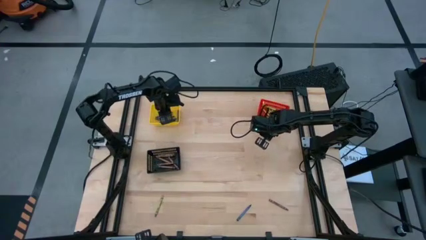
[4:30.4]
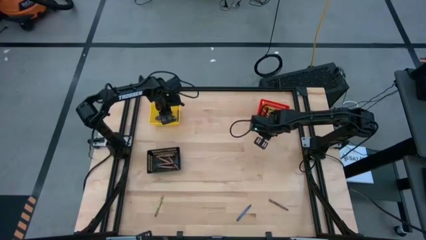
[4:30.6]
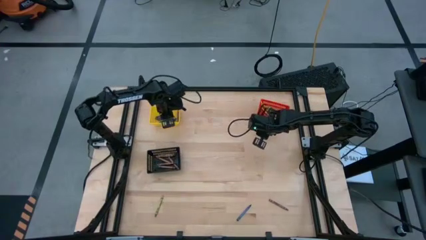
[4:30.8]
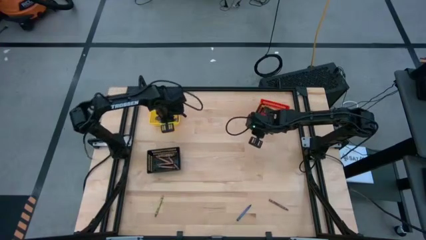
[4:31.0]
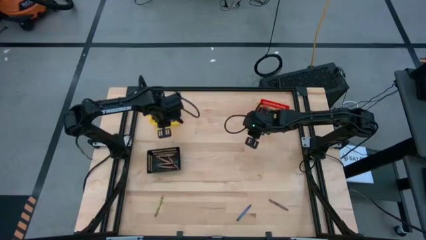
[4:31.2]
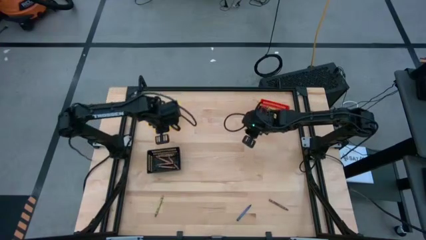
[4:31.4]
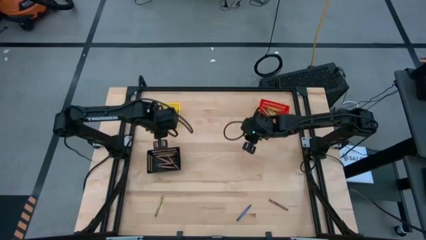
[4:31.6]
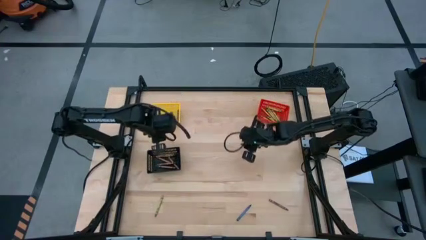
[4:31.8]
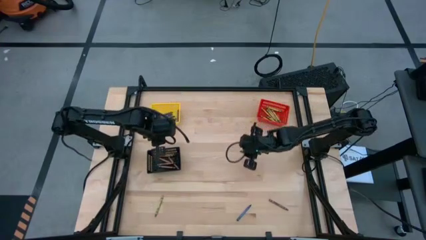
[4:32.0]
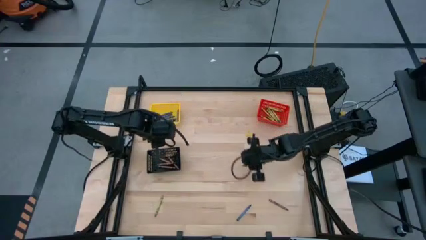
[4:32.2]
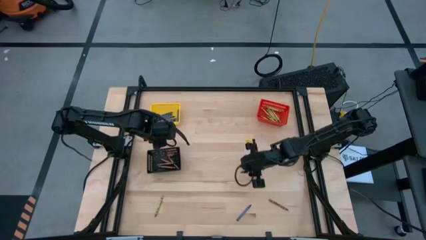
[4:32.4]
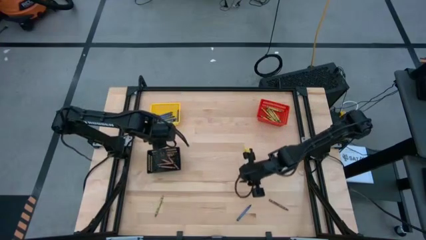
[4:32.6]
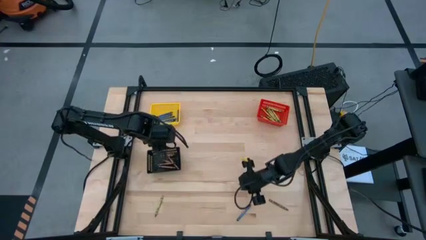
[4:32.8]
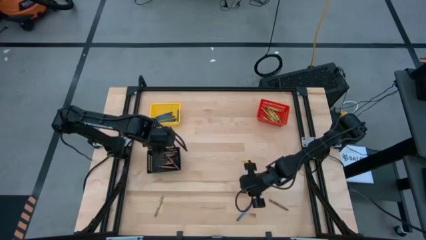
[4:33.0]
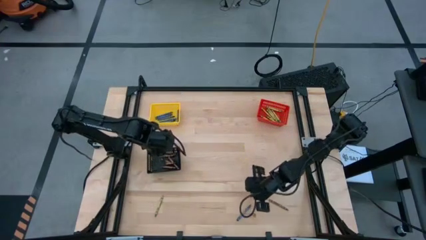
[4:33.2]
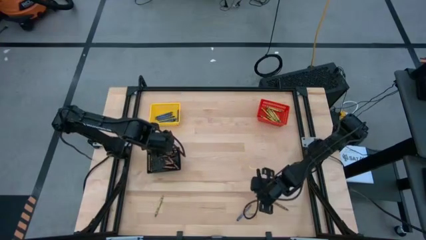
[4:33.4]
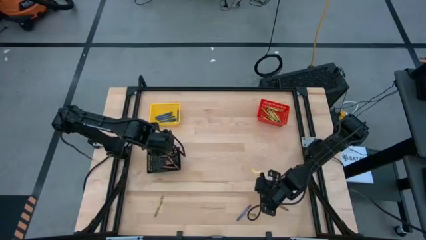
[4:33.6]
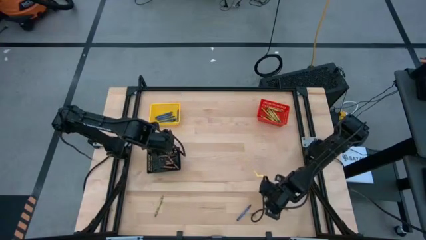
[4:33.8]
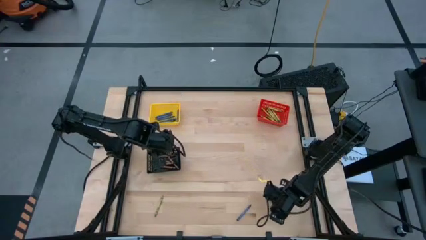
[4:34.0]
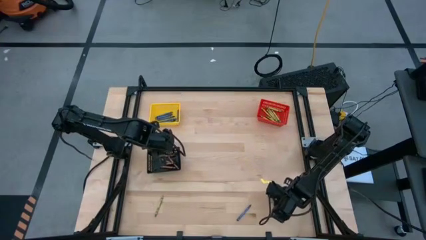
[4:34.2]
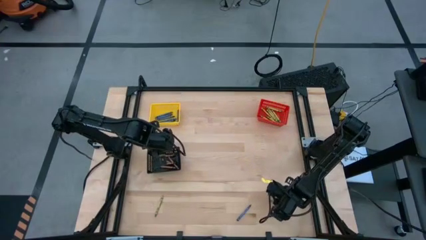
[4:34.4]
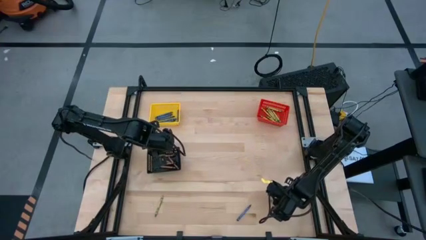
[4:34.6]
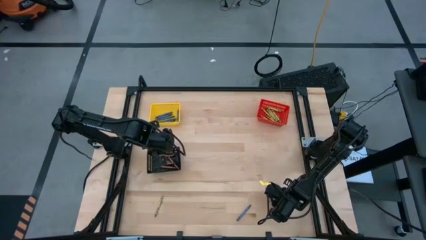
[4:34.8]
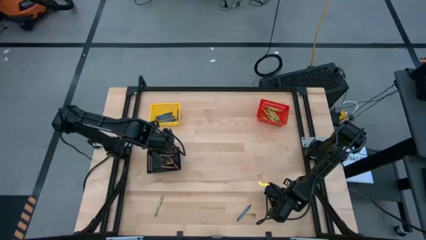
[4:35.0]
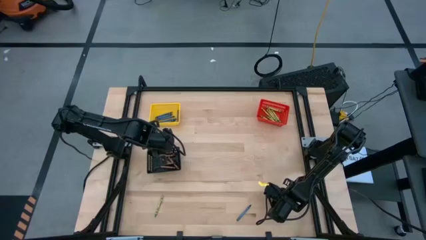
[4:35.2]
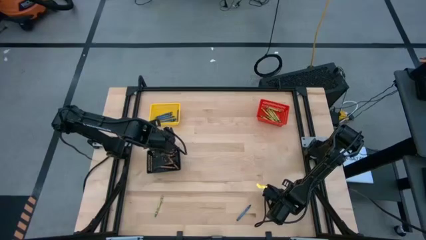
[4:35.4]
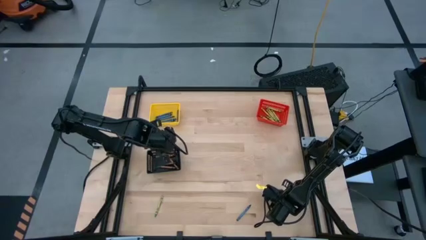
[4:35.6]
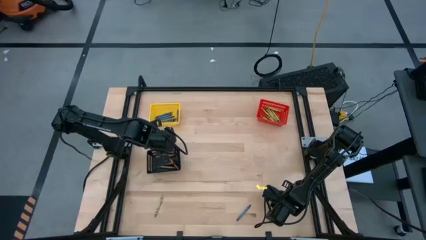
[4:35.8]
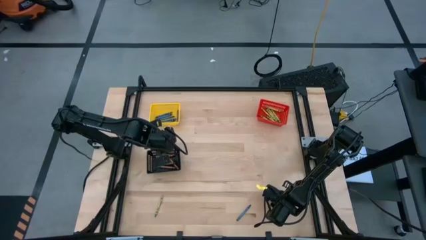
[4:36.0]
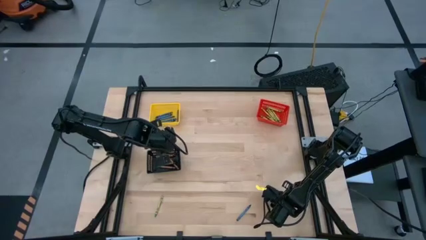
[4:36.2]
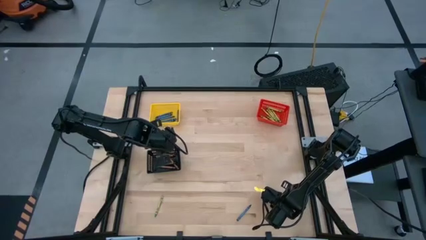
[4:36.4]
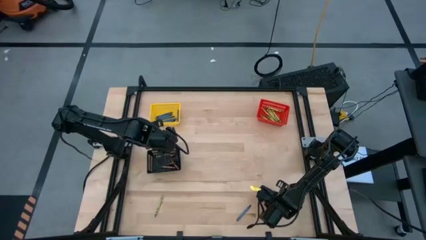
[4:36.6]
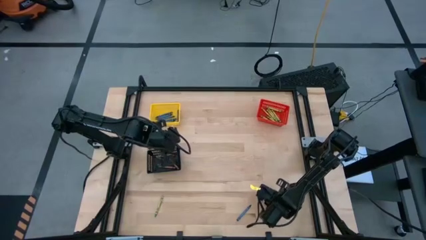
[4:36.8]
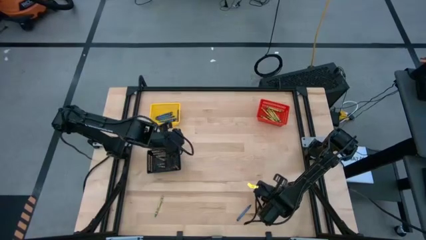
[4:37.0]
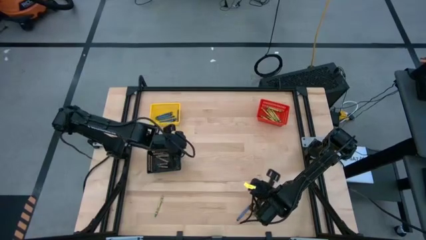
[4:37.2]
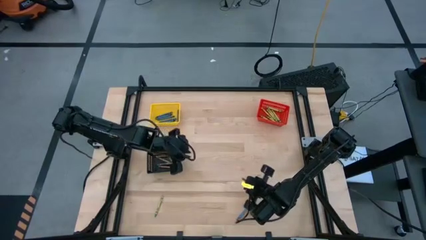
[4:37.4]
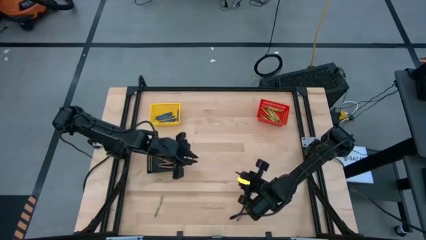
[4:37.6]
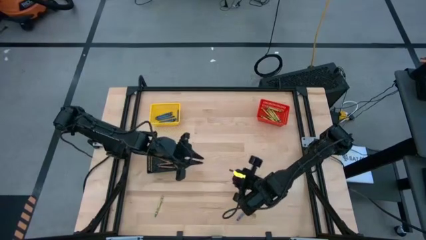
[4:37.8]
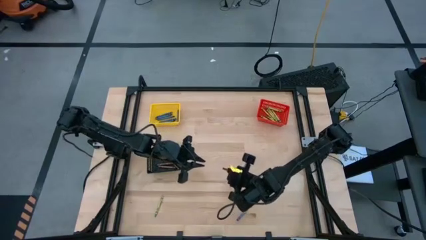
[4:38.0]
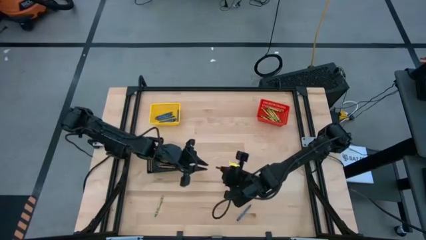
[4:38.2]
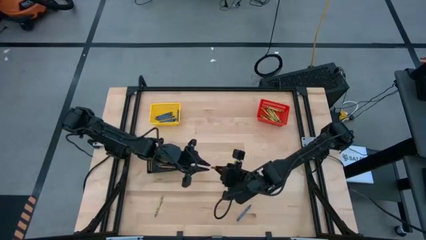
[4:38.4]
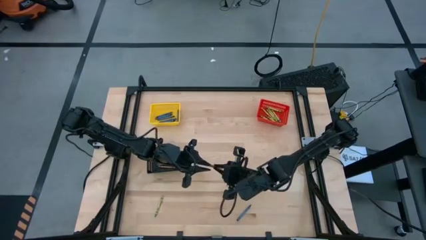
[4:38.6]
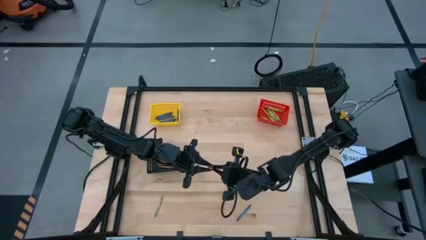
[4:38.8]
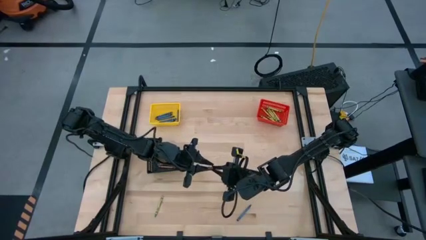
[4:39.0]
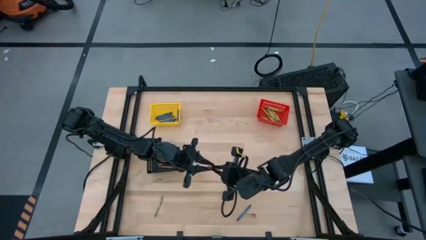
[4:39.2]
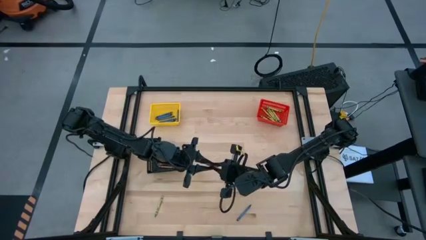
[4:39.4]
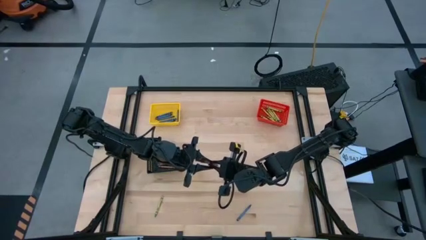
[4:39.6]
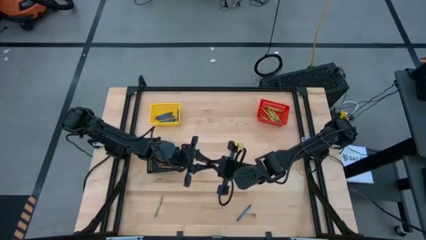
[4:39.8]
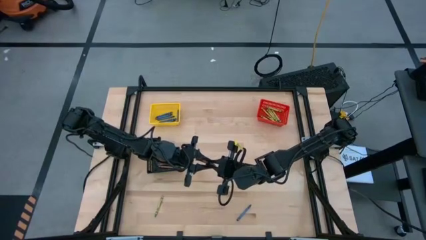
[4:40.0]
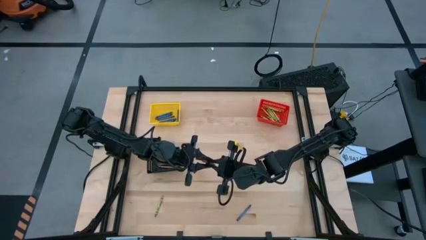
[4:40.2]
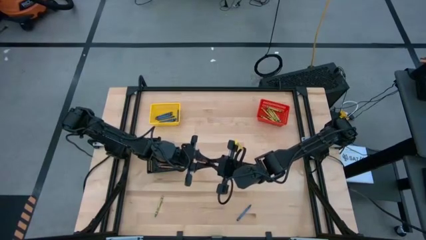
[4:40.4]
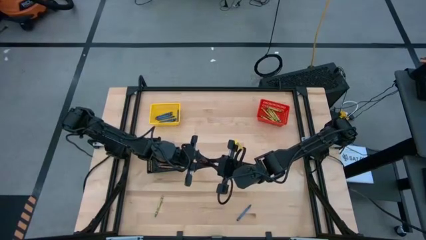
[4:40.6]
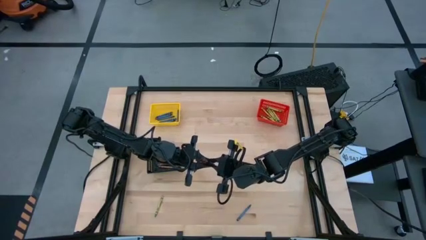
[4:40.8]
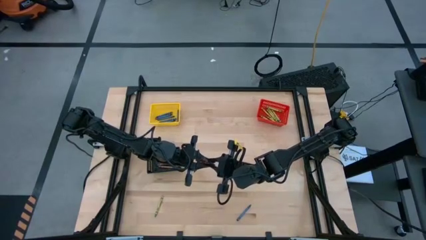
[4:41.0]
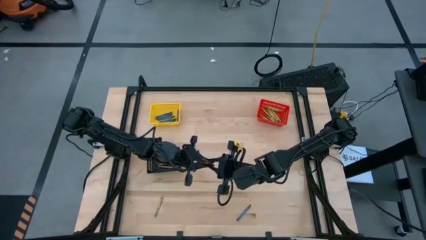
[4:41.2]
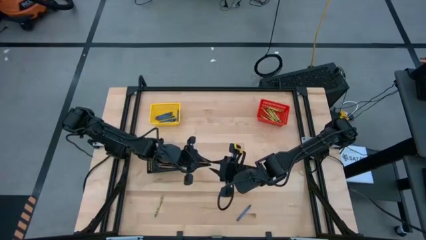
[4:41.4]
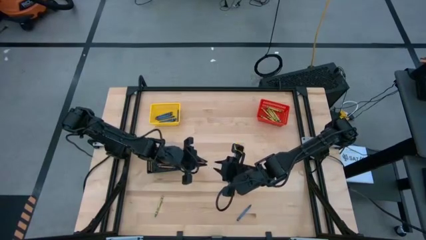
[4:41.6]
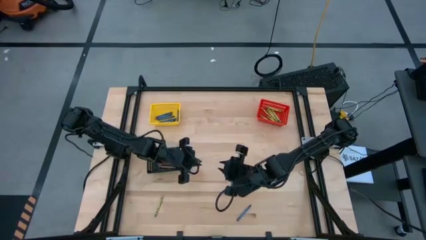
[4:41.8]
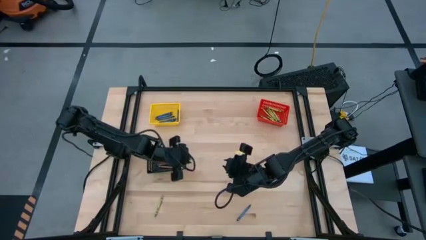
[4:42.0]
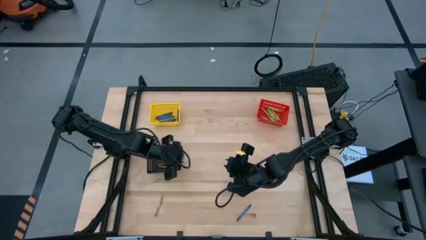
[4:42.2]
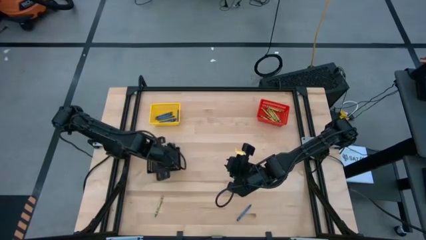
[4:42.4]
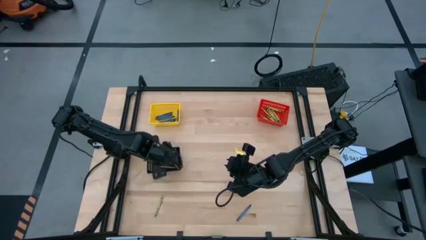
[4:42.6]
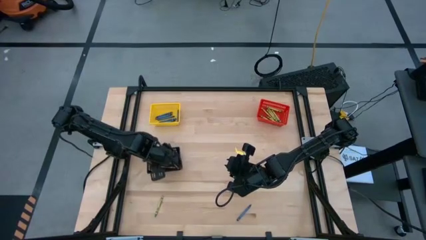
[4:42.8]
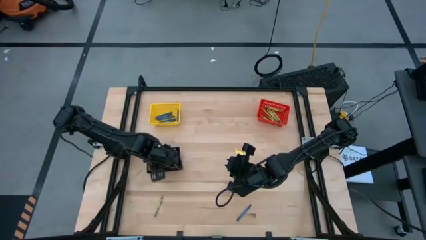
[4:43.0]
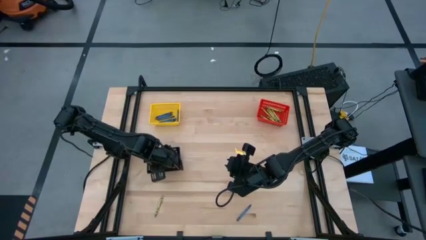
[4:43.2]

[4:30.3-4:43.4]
Task: Sort crayons
Put the brown crayon into the black bin
